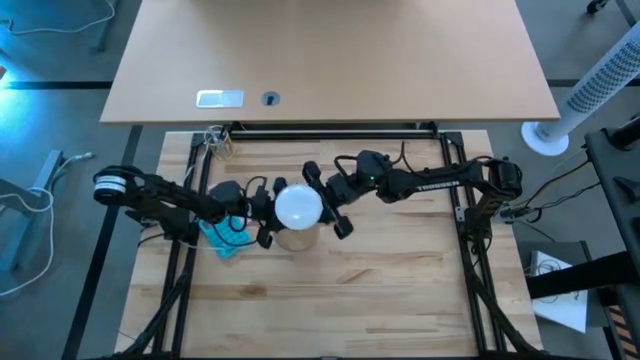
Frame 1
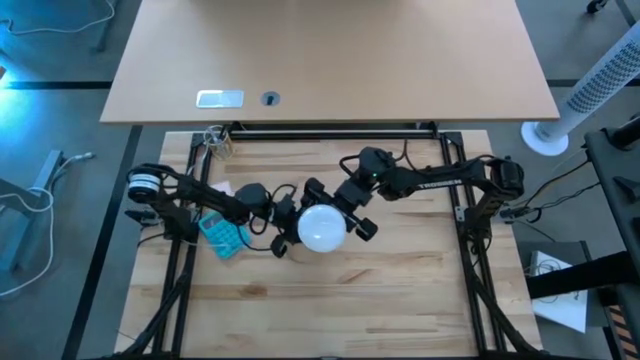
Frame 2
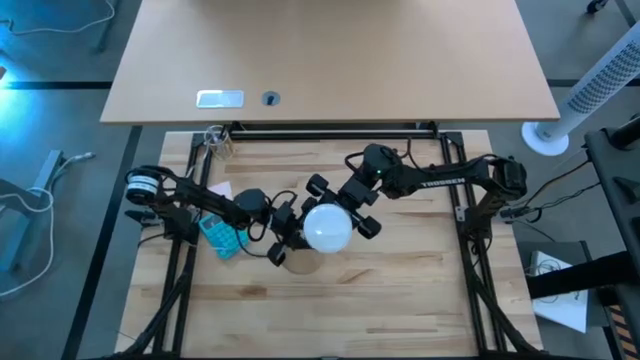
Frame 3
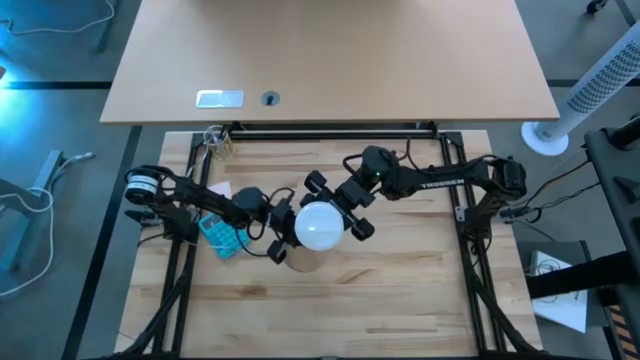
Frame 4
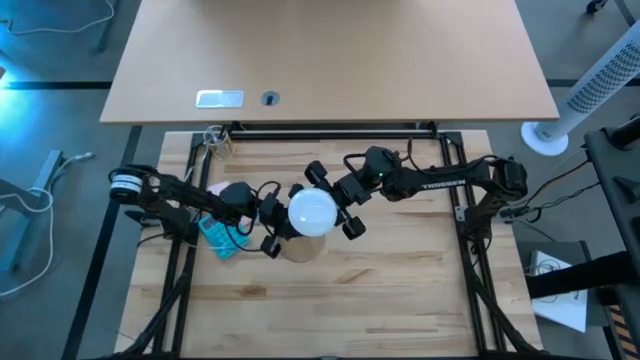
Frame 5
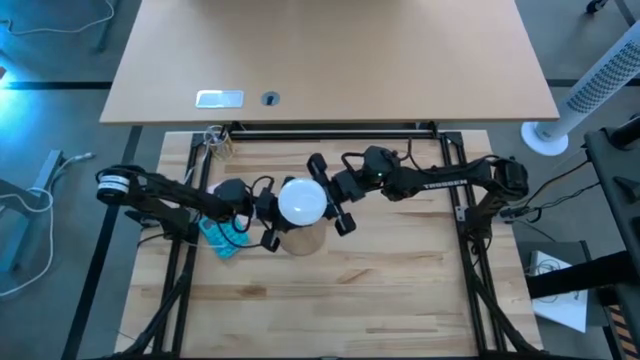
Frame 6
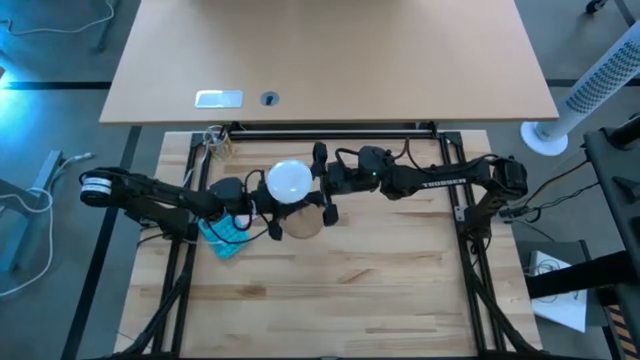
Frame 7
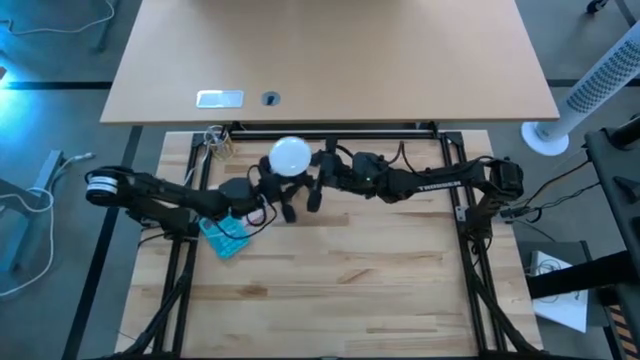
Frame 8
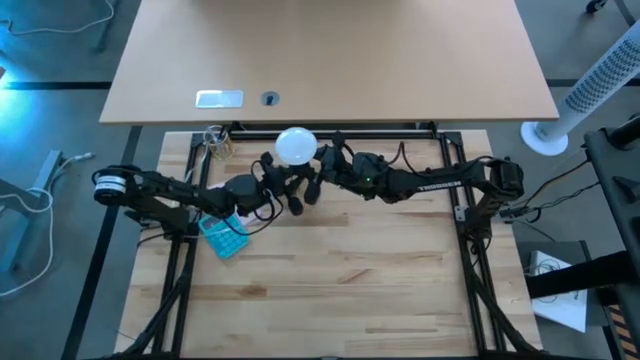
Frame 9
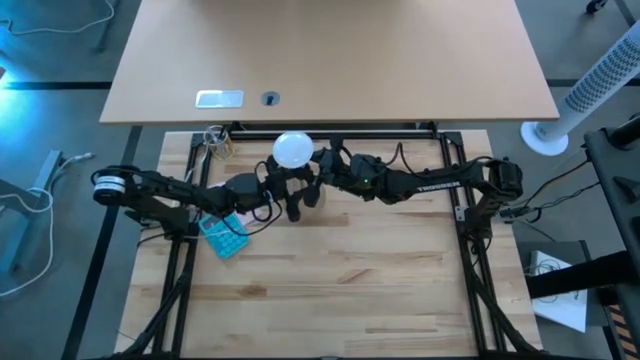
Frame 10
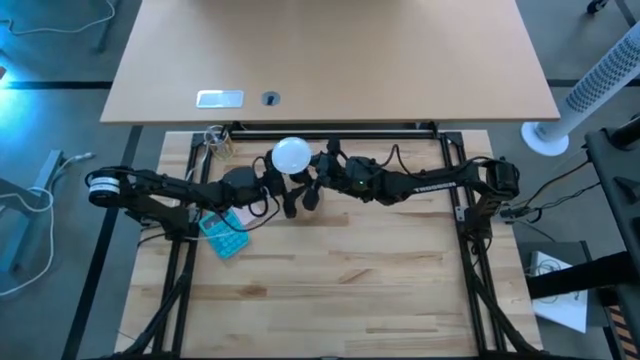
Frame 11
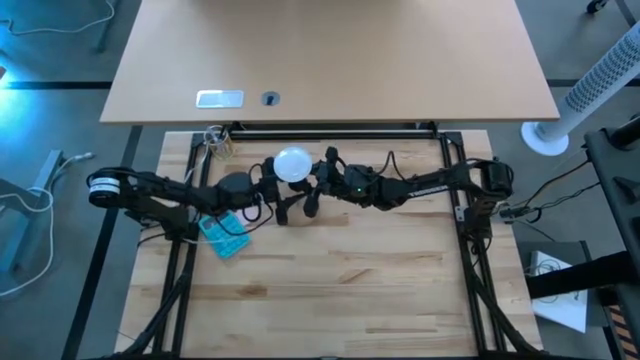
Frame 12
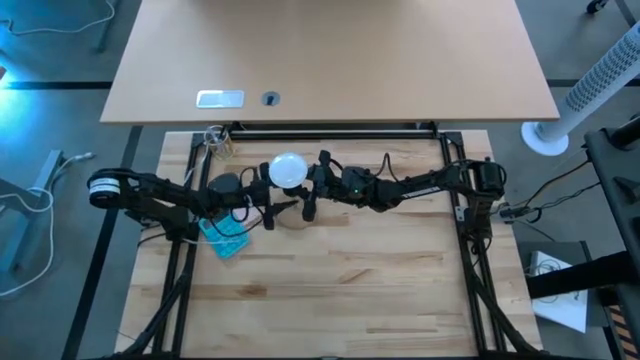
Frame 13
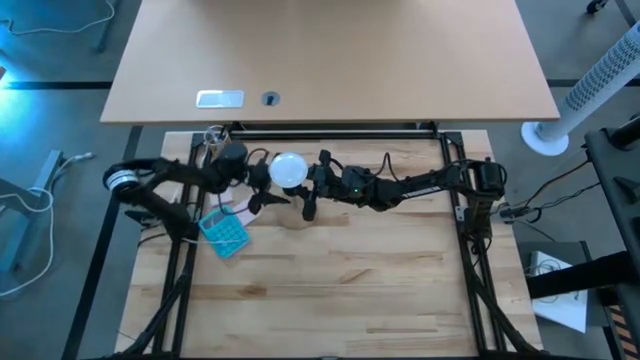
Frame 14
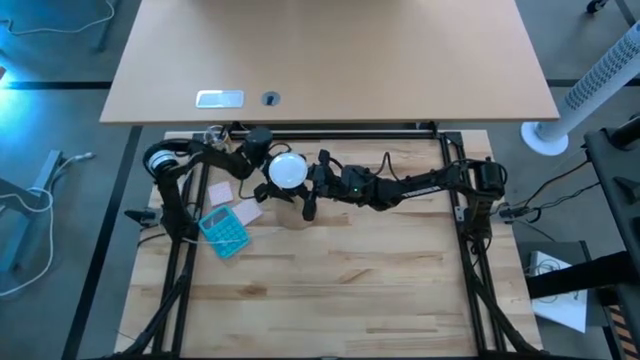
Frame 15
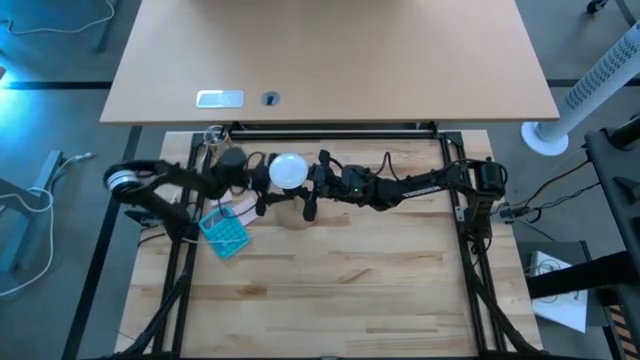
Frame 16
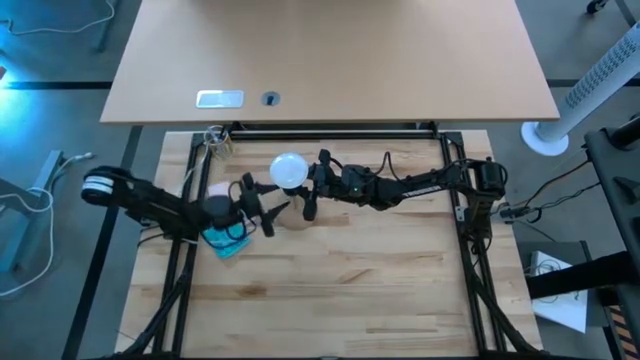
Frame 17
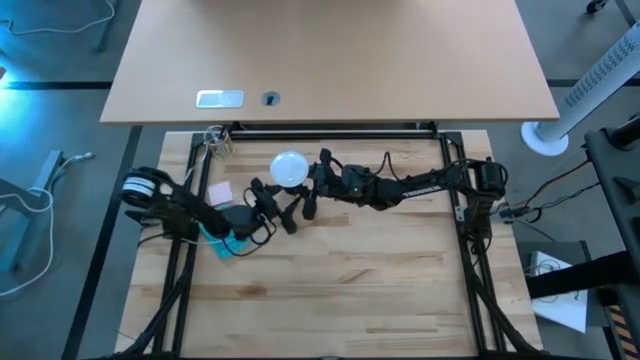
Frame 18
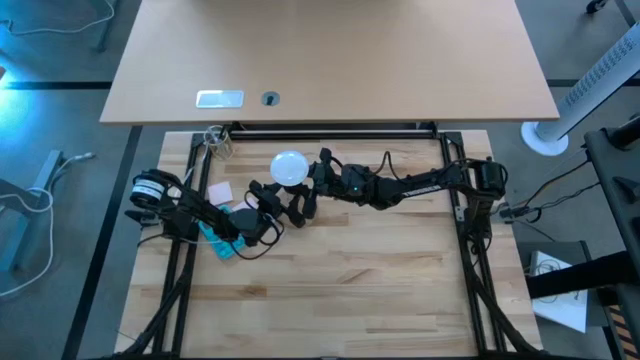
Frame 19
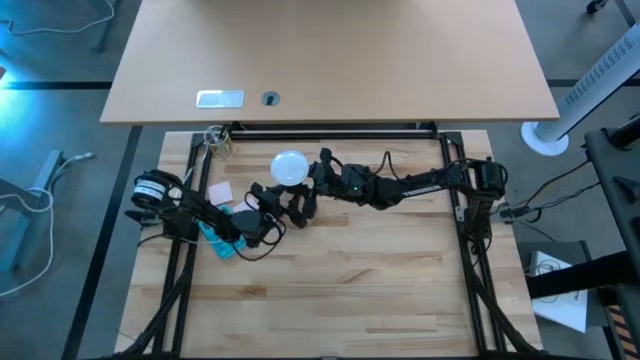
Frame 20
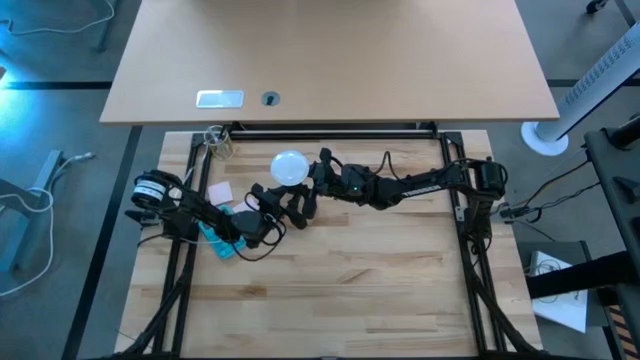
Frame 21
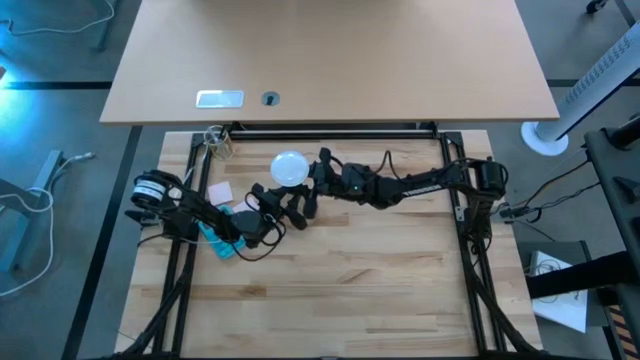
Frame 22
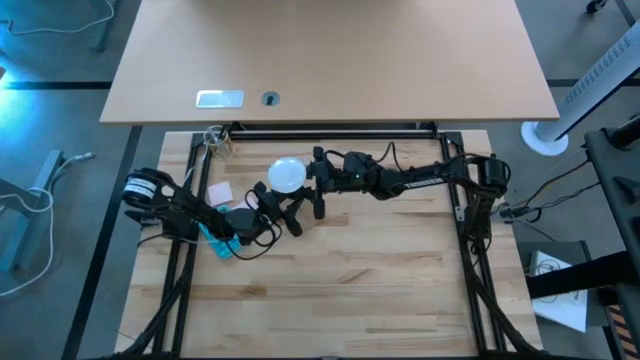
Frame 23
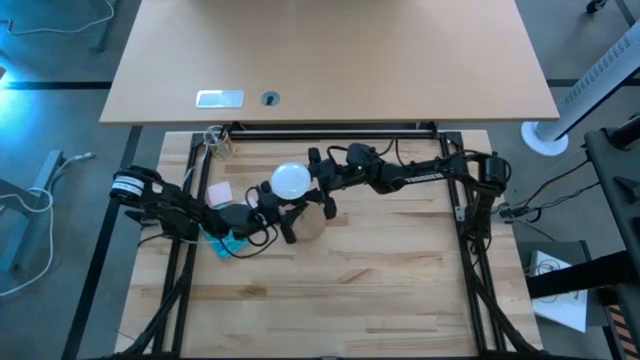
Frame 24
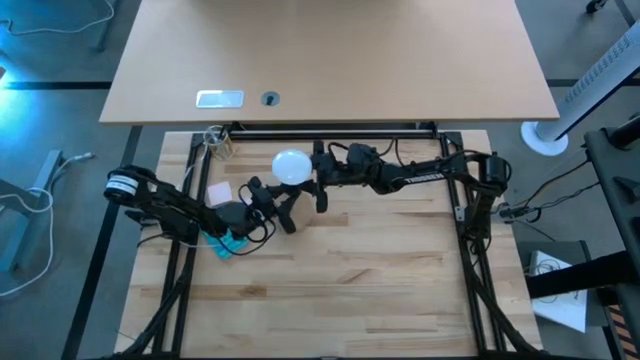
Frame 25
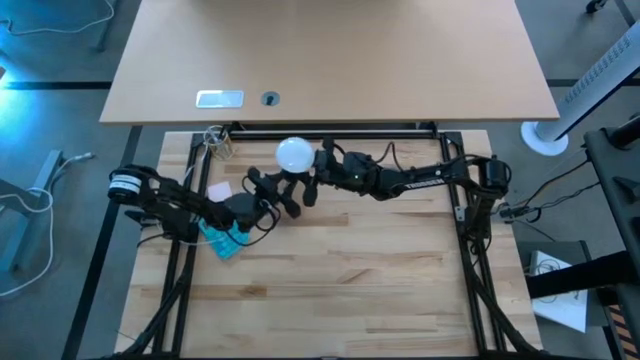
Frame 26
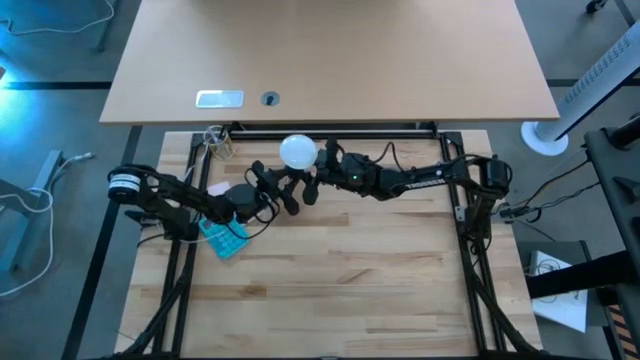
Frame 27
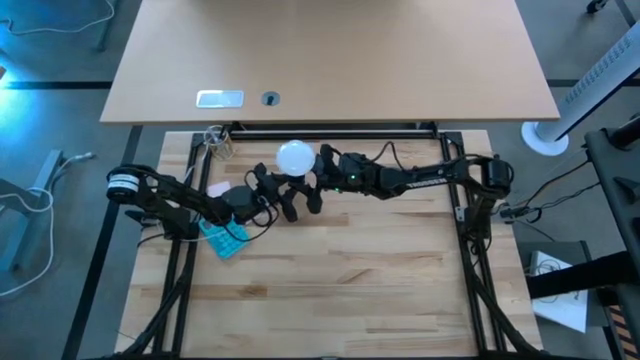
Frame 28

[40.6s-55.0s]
Task: Screw lightbulb
Insert the lightbulb into the lamp

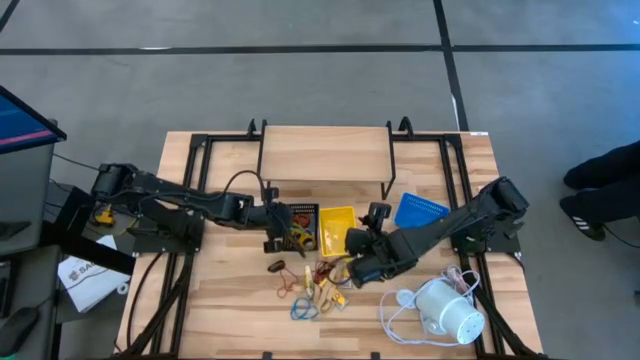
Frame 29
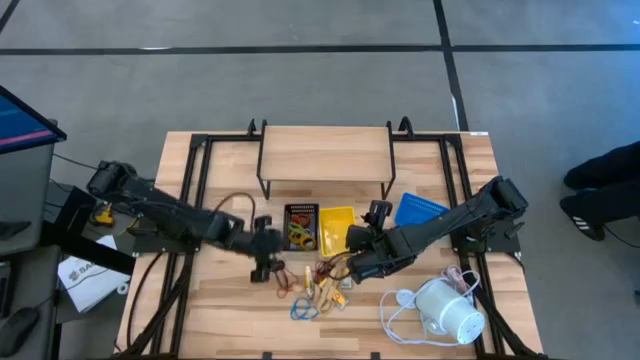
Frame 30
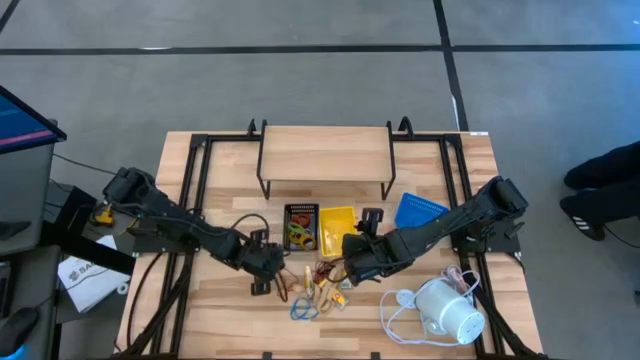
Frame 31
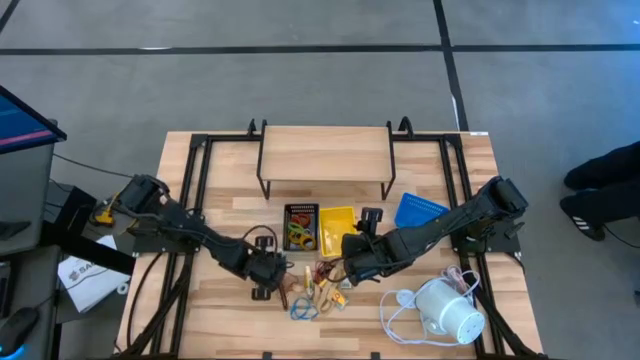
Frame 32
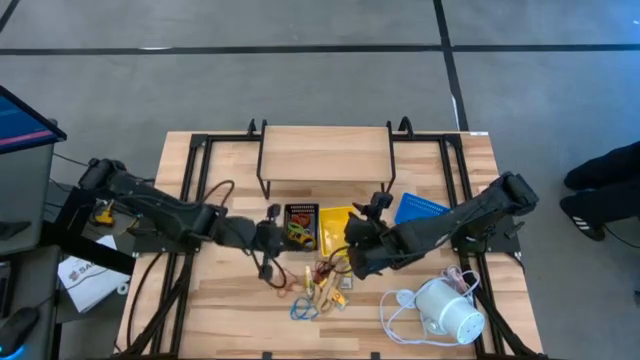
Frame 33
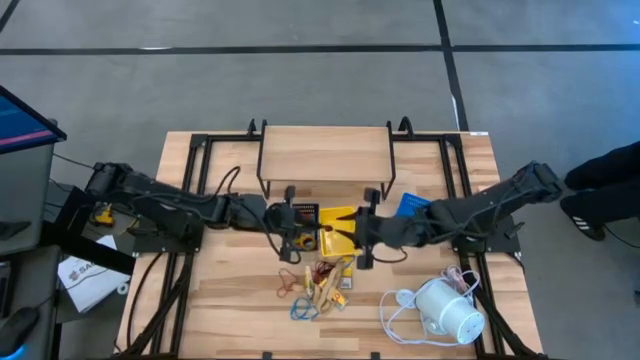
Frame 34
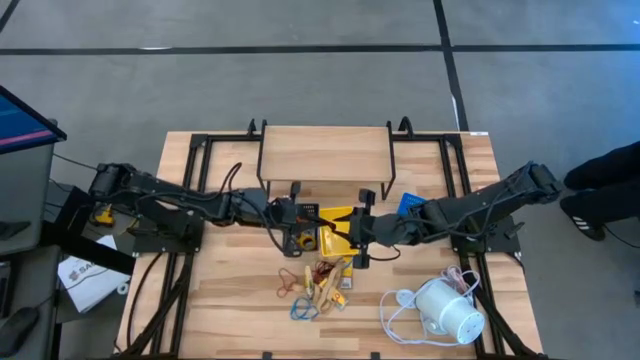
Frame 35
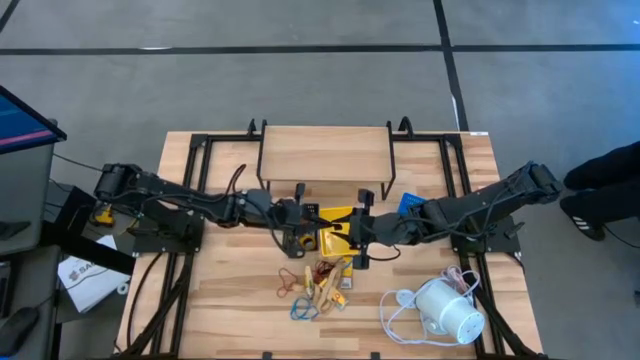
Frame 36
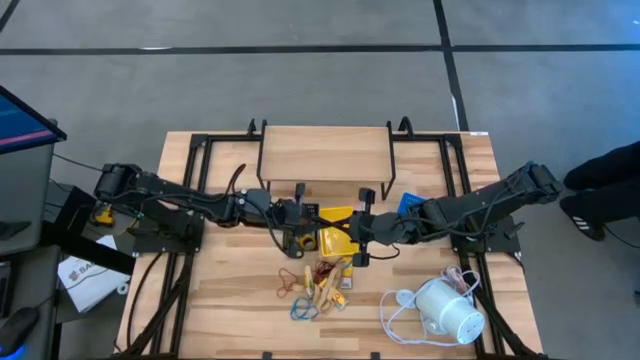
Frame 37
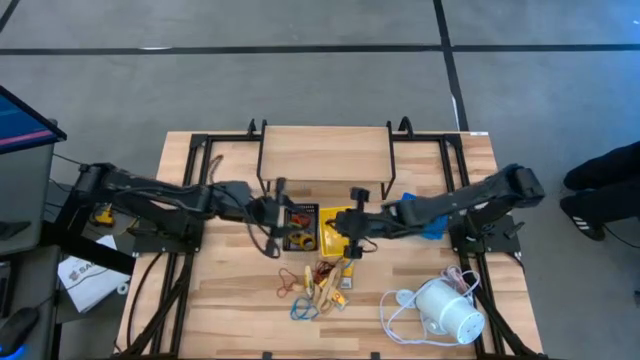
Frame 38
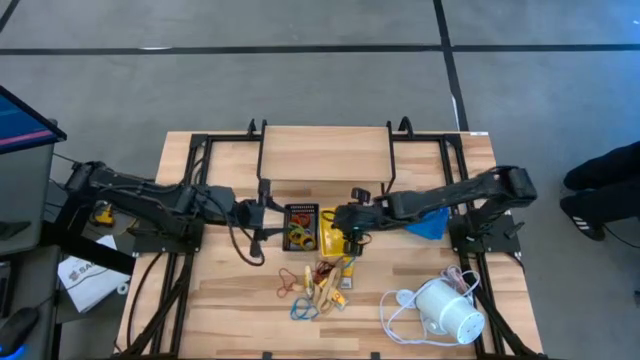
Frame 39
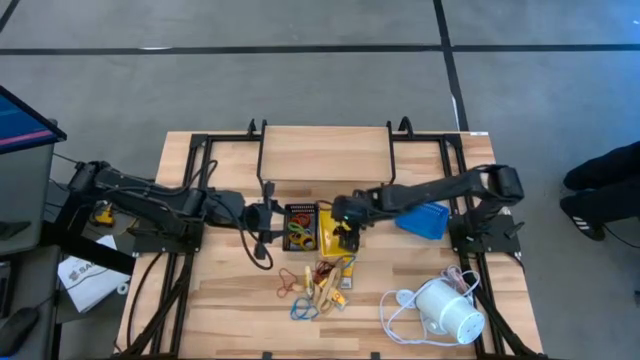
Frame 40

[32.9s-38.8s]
Task: Pick & Place Office Desk Supplies
Put the black rubber band into the yellow bin

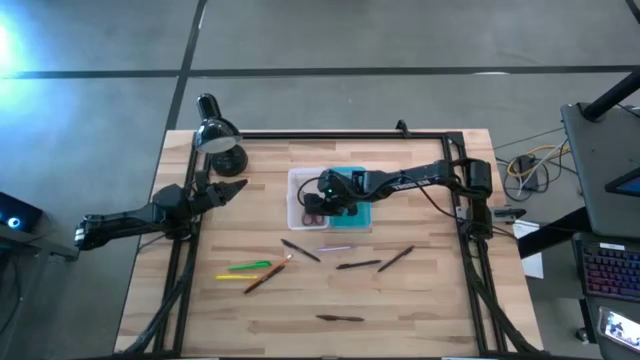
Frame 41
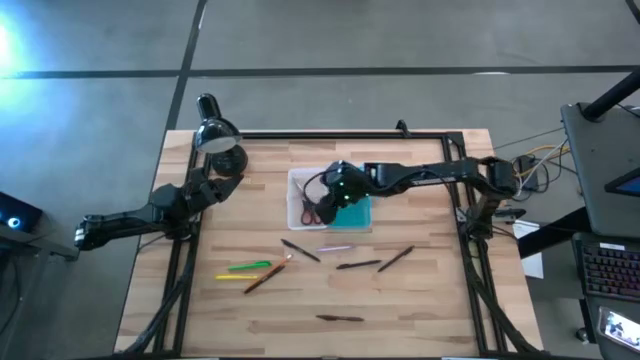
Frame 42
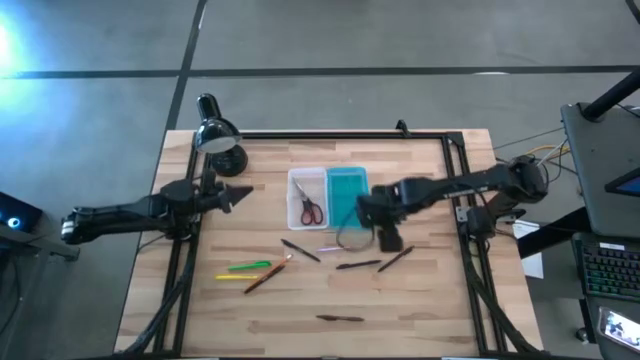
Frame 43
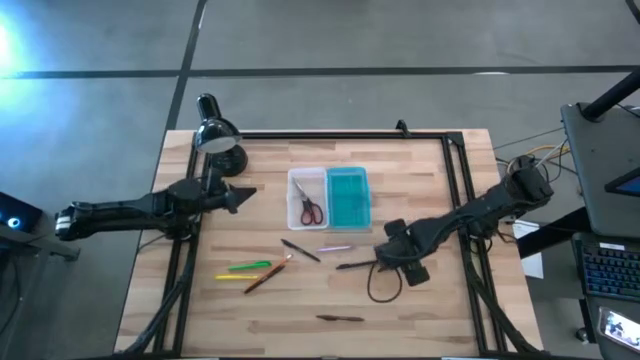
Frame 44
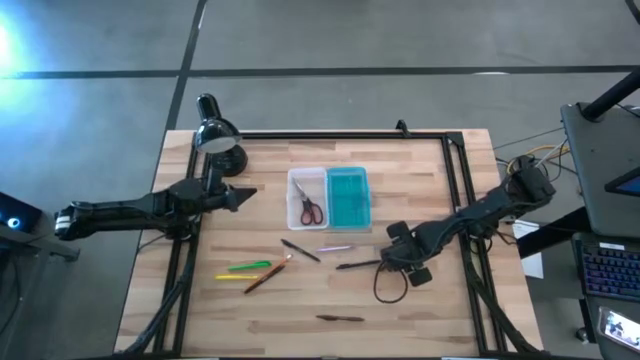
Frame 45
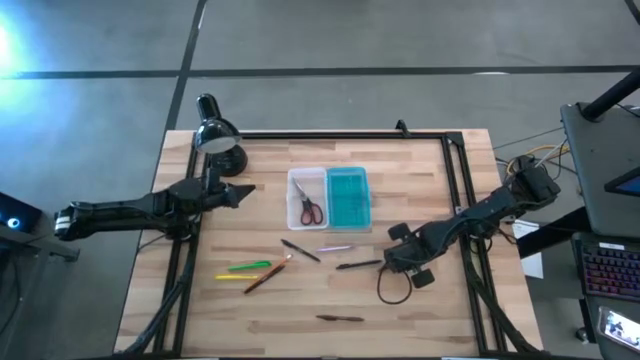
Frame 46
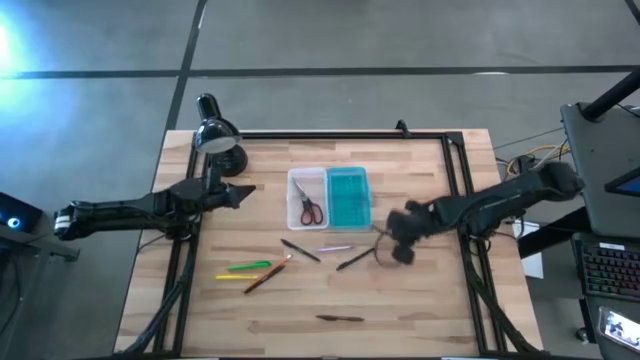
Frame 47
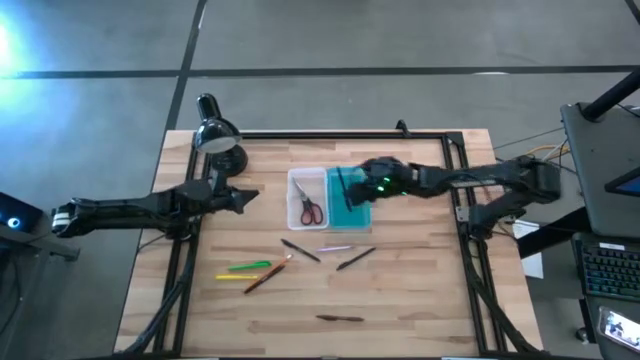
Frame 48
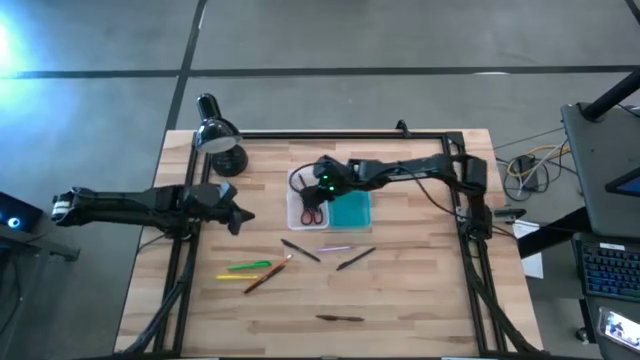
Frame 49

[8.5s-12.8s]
Task: Pick & place school supplies into a supply box
Put the black pen into the supply box
